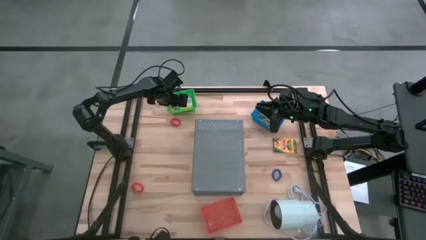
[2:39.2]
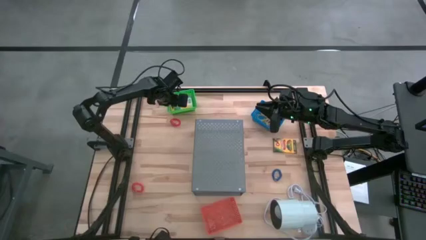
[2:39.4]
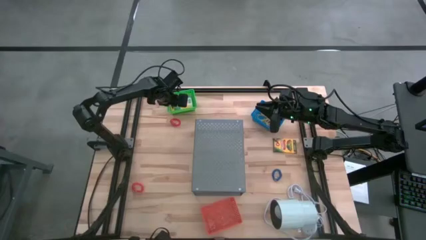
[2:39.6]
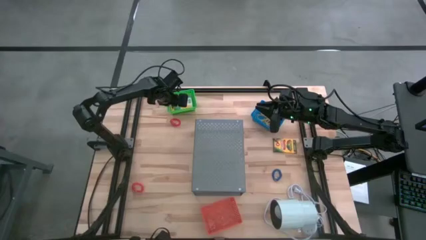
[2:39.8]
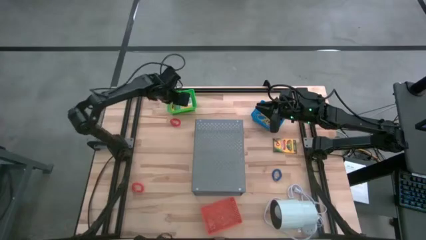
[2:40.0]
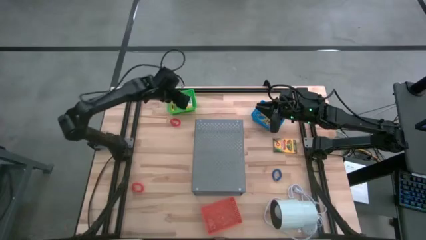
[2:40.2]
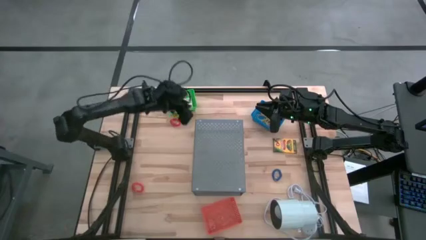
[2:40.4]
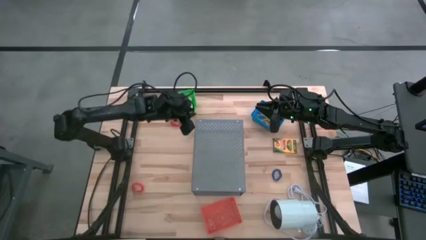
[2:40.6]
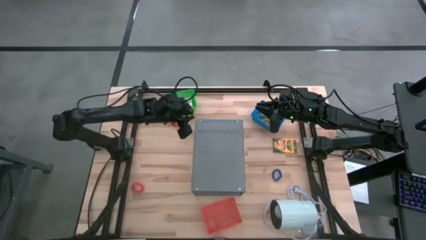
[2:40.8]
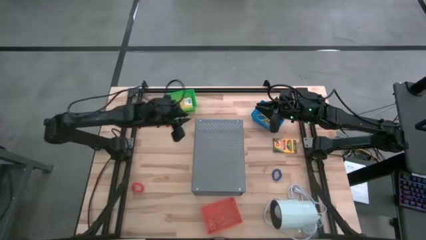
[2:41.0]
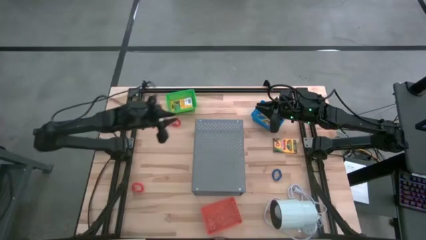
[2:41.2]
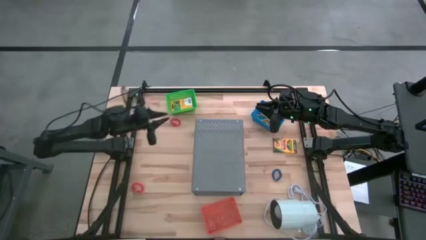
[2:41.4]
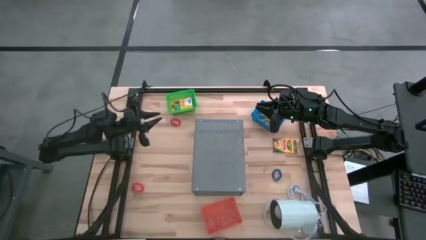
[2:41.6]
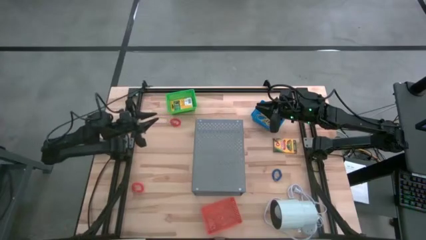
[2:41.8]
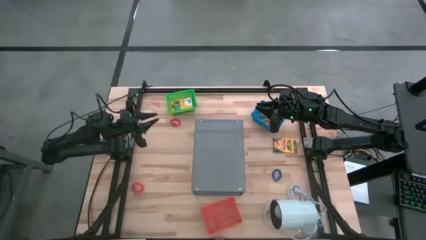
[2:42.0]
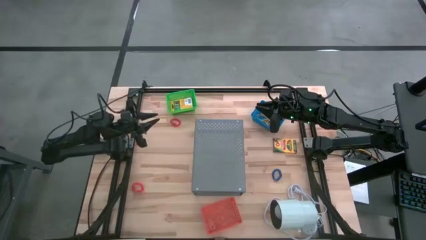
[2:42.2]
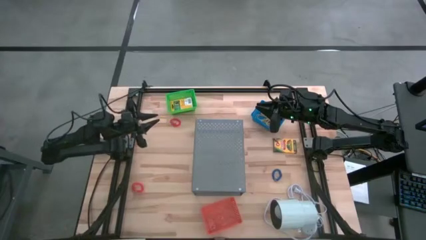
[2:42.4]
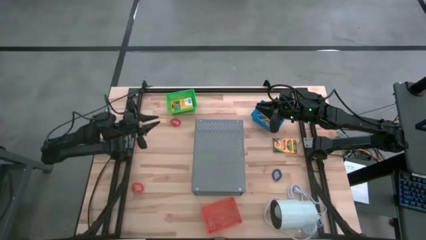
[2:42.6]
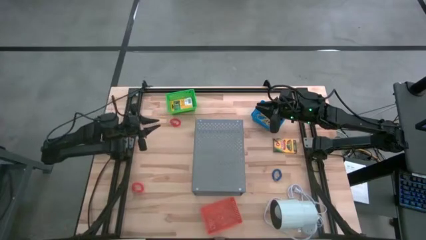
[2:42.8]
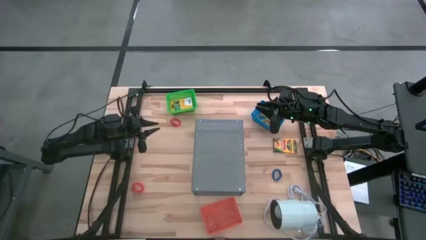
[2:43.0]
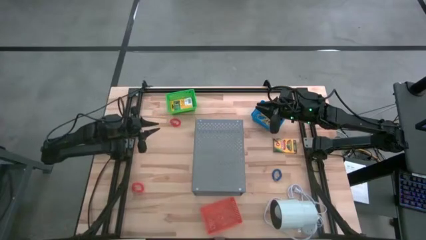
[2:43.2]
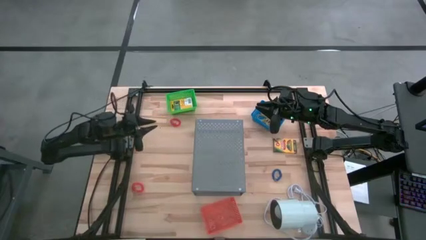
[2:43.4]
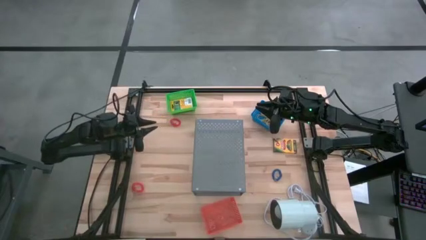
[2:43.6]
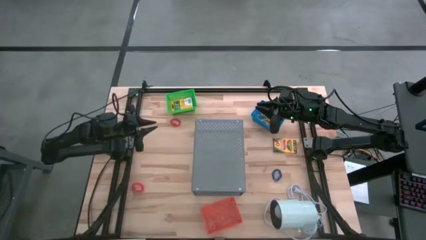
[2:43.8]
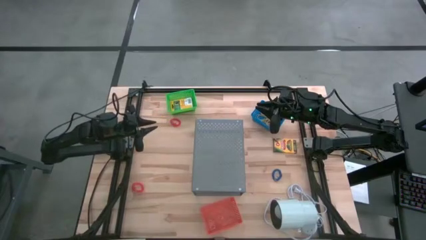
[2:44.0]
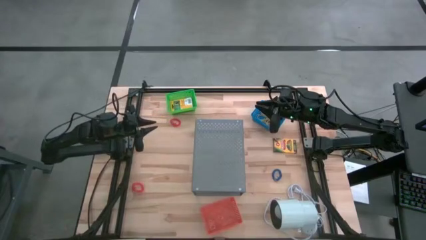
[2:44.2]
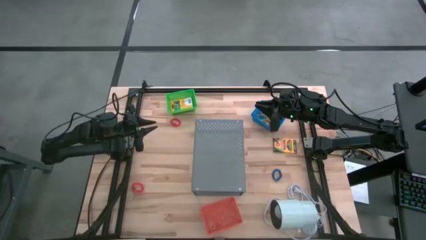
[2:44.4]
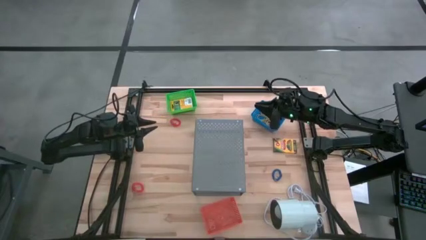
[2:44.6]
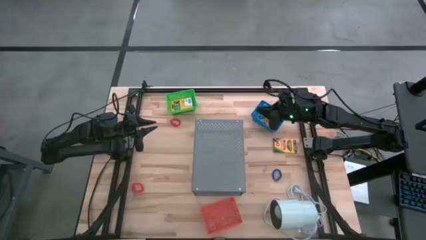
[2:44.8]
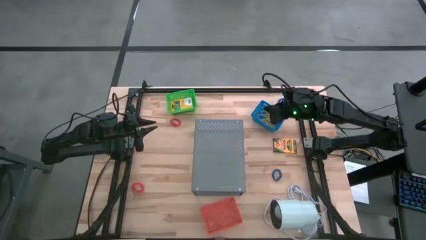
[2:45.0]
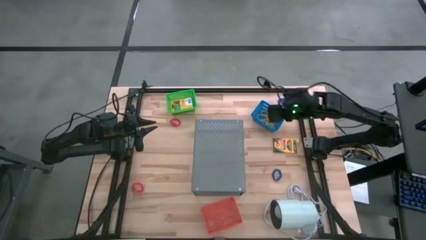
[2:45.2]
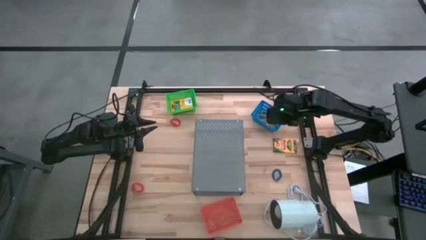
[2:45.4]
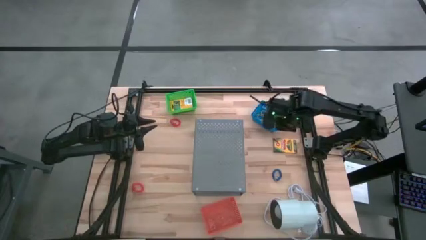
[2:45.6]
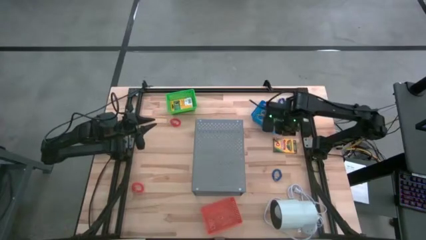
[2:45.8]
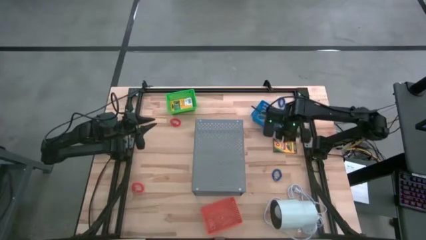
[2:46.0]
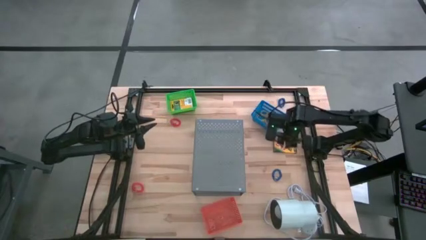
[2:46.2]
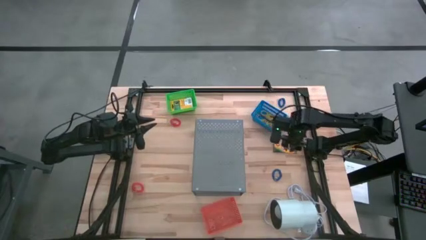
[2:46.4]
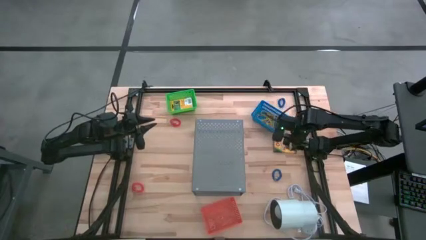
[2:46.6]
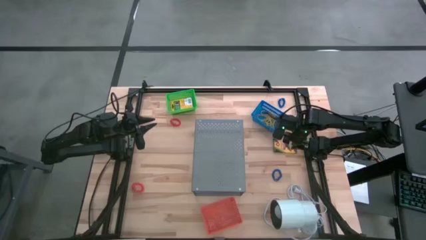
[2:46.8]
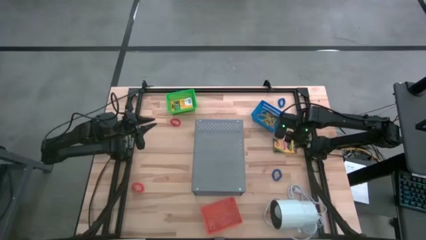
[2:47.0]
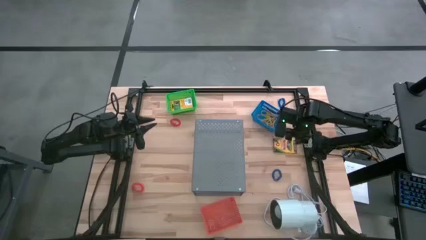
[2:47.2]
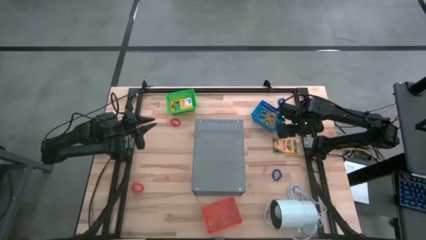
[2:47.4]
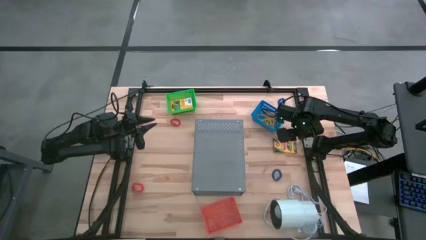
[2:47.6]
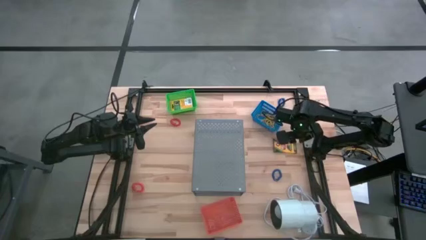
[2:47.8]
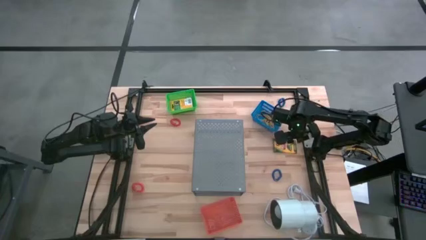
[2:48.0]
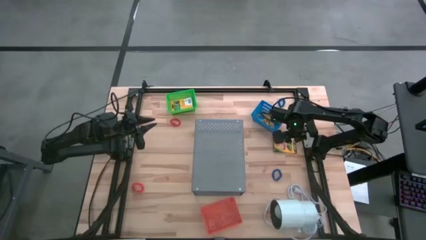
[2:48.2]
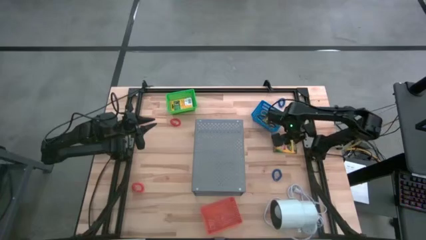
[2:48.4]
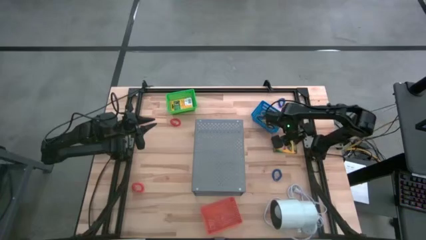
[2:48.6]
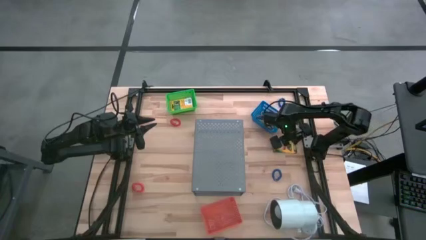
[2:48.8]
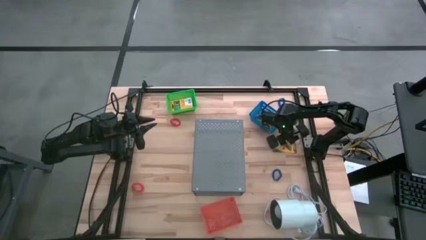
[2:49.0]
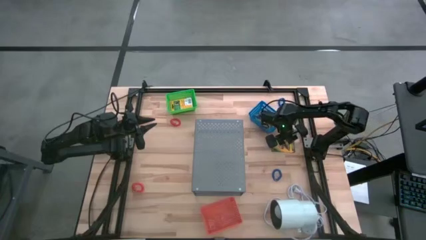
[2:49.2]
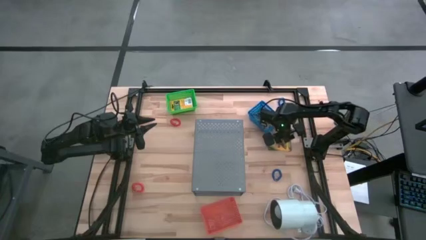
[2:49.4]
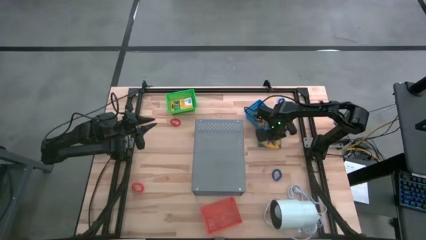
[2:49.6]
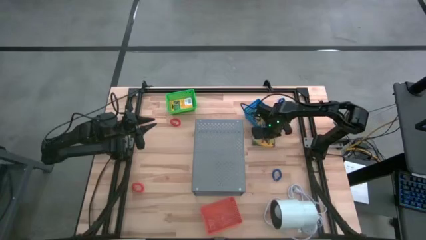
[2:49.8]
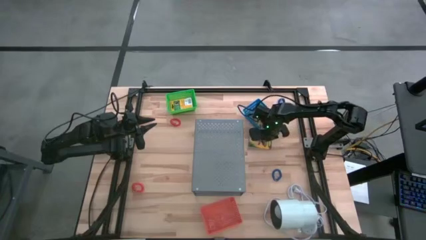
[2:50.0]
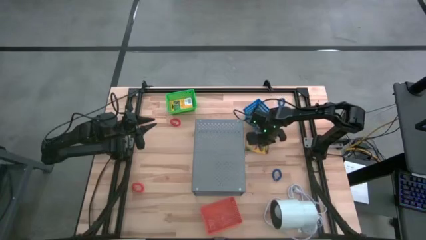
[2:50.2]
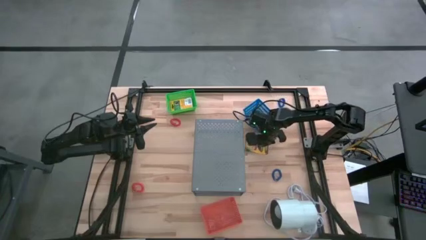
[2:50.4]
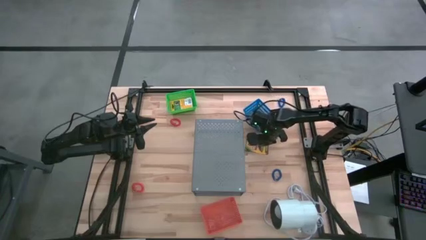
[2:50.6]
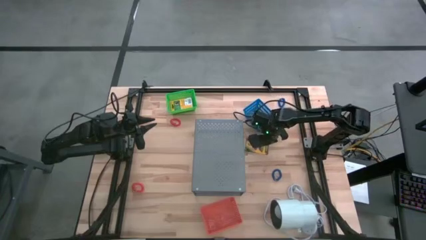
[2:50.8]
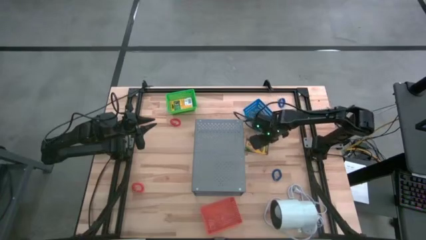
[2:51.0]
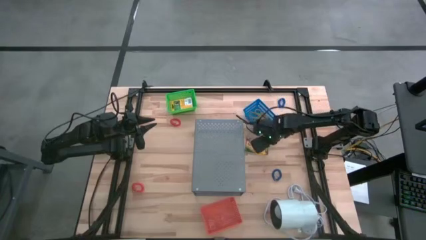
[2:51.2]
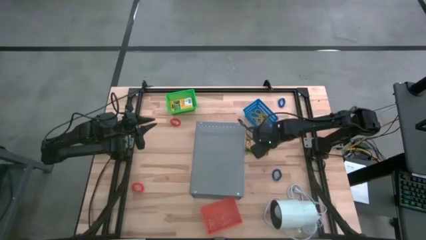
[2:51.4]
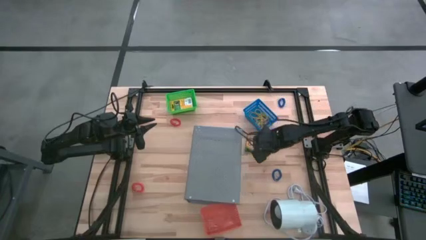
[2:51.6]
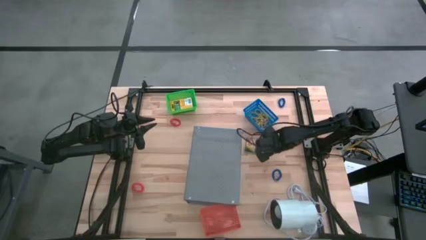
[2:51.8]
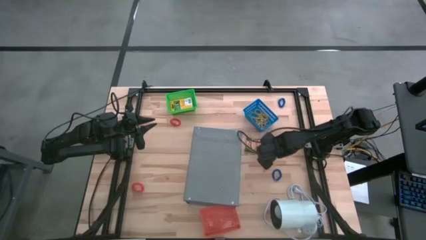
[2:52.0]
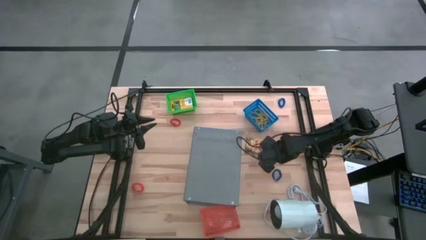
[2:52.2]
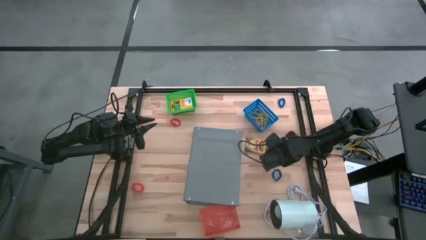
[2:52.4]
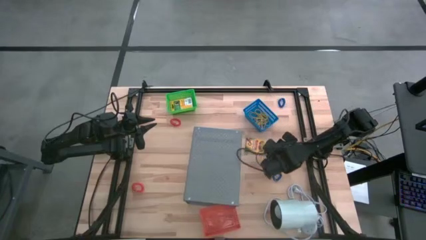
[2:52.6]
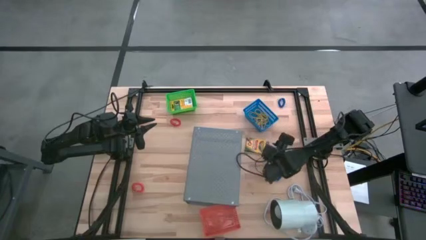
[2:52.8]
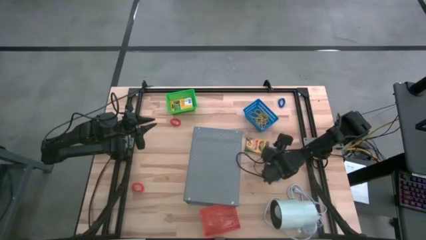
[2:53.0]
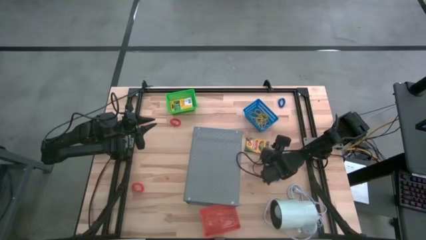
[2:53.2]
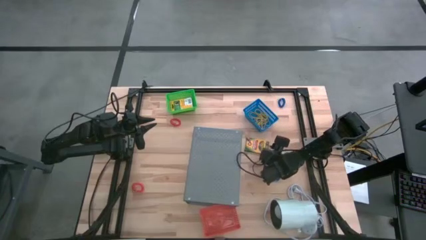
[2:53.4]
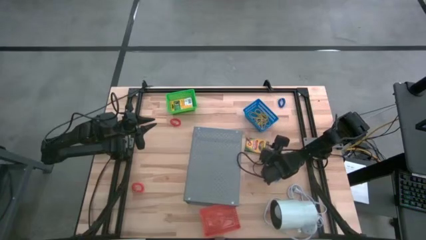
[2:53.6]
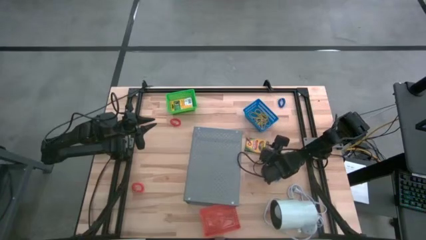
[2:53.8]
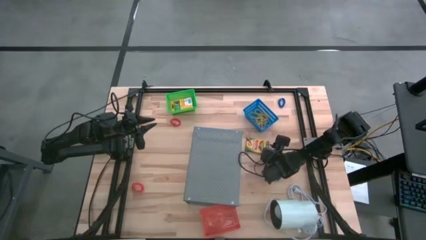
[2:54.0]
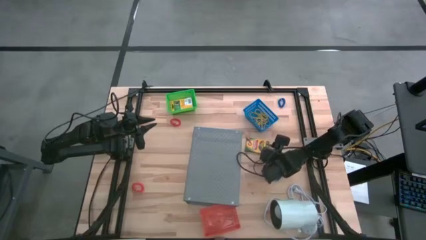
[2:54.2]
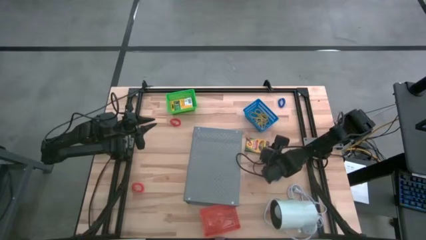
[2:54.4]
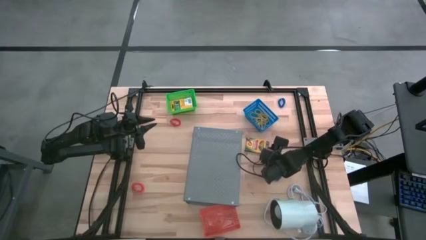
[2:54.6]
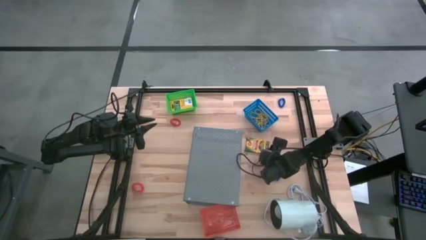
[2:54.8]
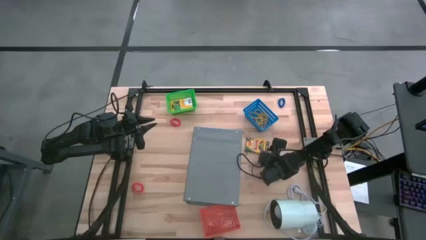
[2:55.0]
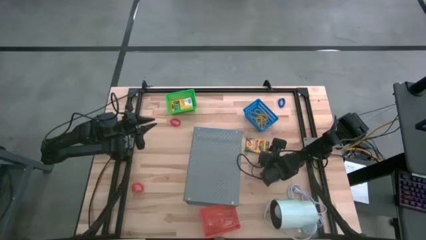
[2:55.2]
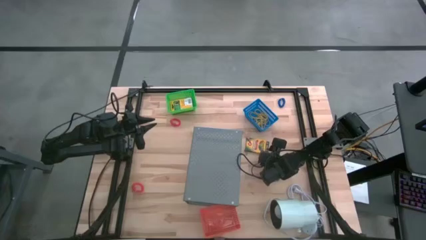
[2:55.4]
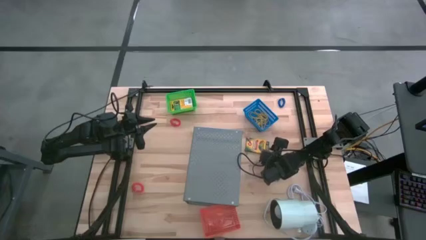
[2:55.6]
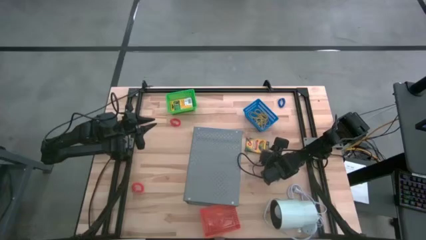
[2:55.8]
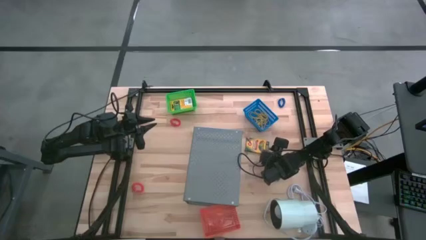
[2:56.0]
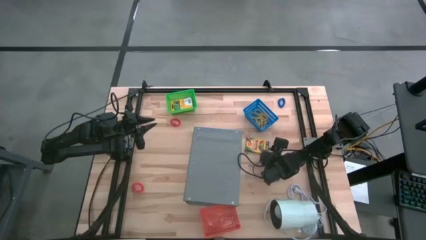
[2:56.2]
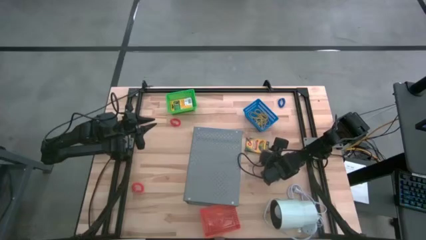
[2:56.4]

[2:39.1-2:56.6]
Task: Pick & Place Office Desk Supplies
Put the yellow crayon box into the green basket
